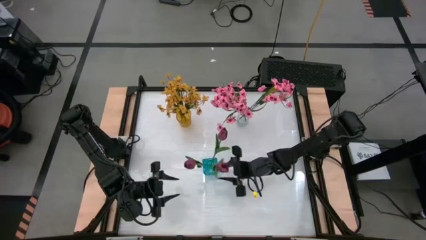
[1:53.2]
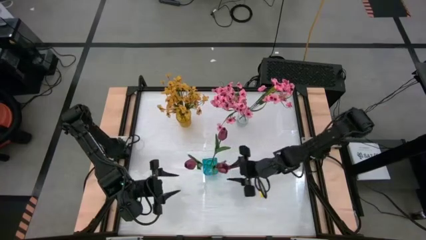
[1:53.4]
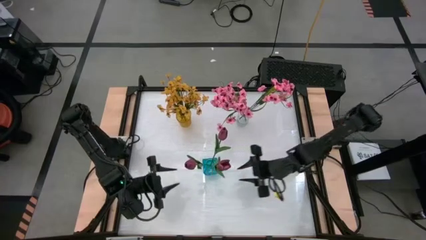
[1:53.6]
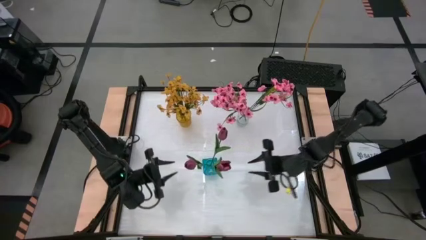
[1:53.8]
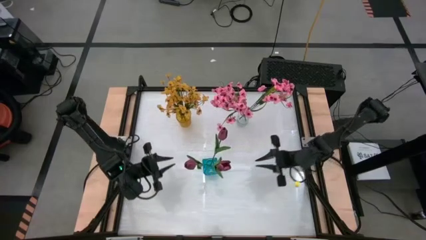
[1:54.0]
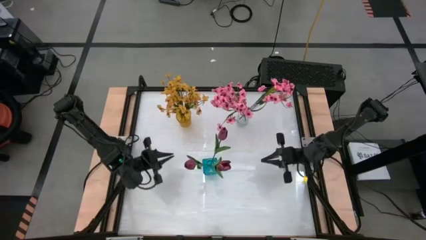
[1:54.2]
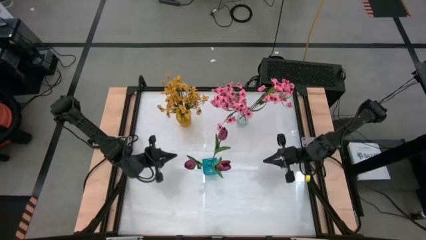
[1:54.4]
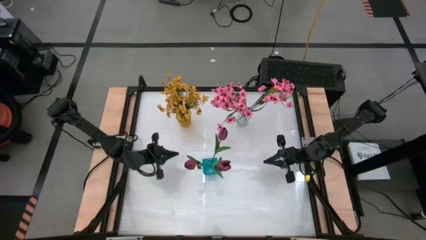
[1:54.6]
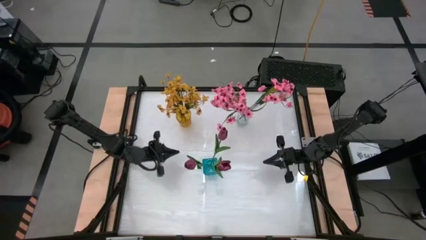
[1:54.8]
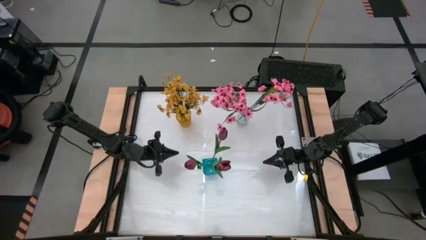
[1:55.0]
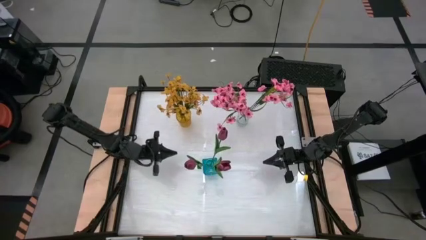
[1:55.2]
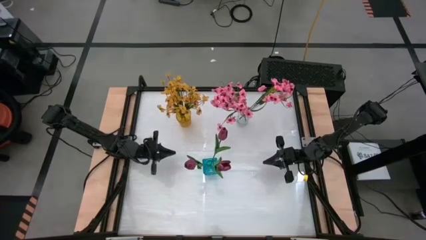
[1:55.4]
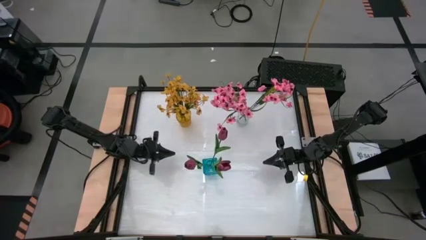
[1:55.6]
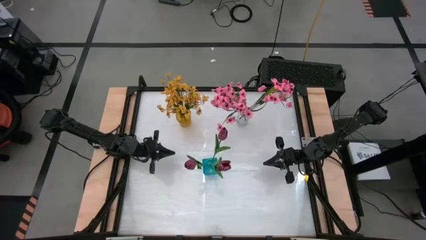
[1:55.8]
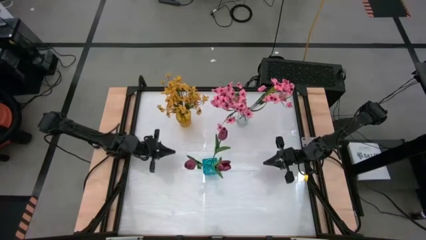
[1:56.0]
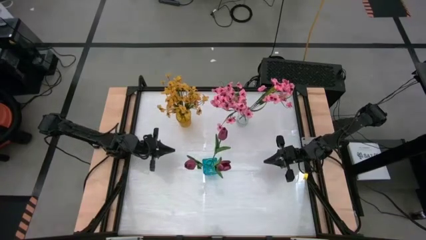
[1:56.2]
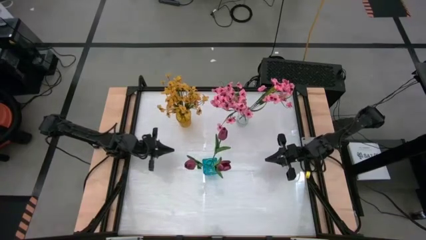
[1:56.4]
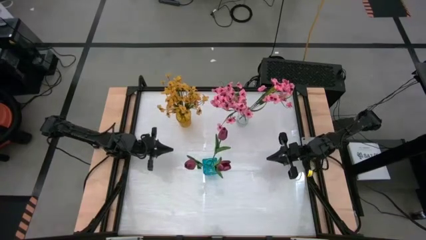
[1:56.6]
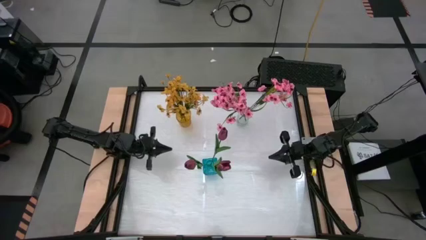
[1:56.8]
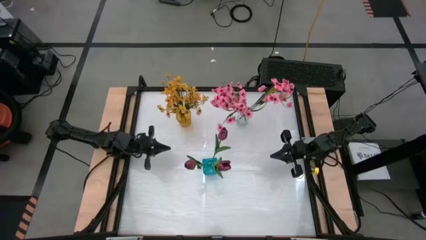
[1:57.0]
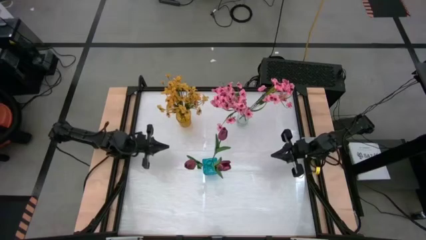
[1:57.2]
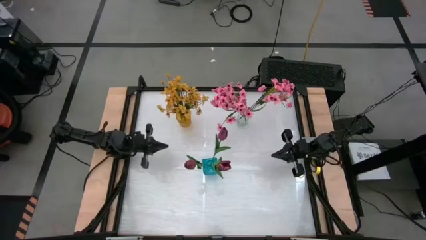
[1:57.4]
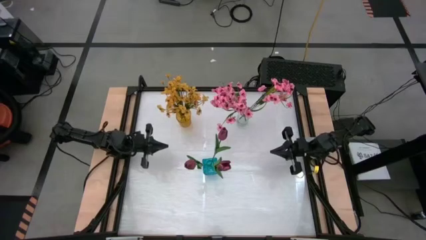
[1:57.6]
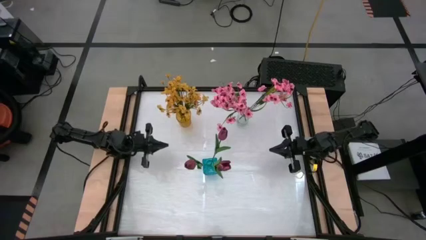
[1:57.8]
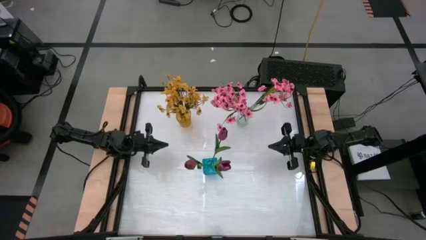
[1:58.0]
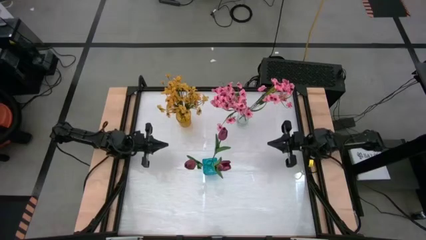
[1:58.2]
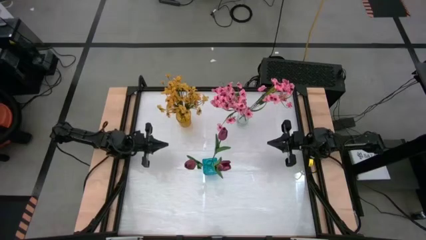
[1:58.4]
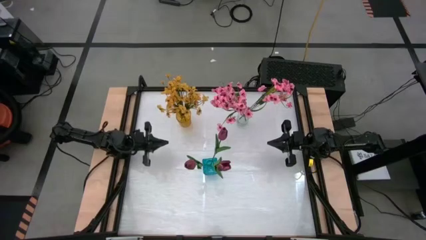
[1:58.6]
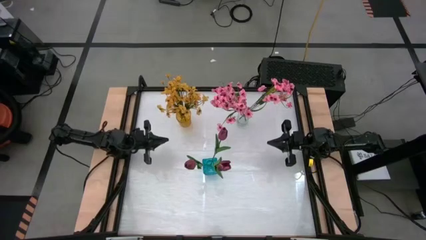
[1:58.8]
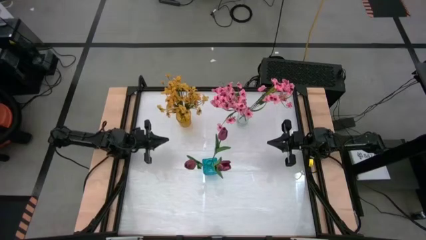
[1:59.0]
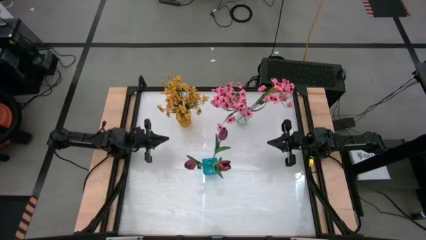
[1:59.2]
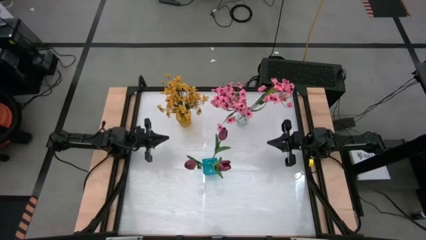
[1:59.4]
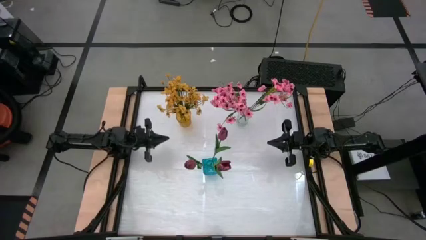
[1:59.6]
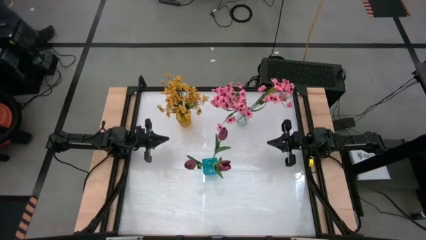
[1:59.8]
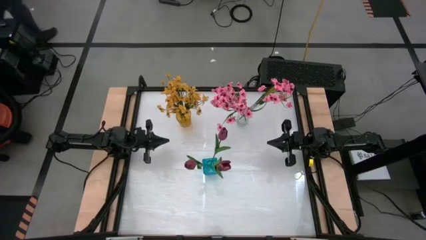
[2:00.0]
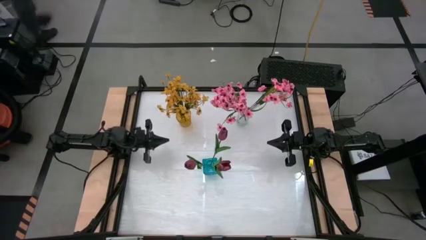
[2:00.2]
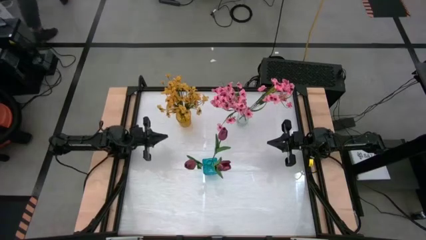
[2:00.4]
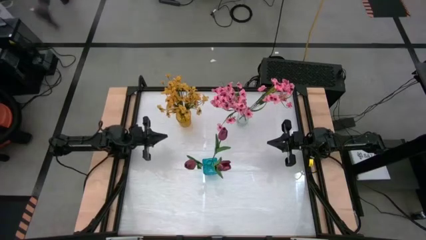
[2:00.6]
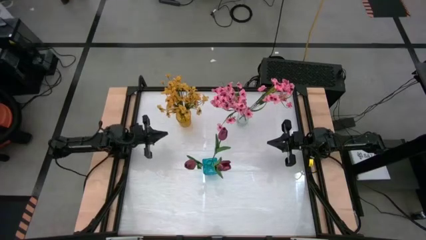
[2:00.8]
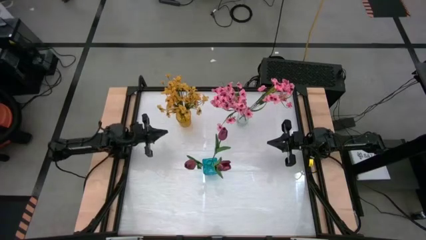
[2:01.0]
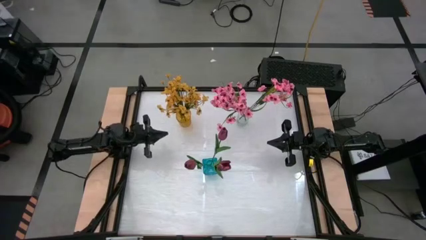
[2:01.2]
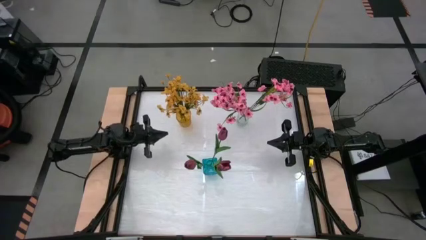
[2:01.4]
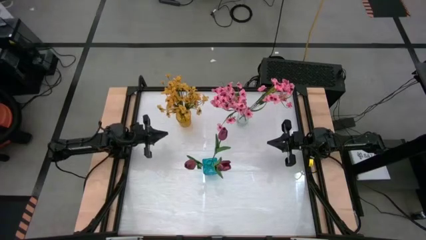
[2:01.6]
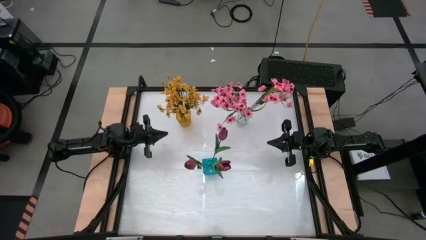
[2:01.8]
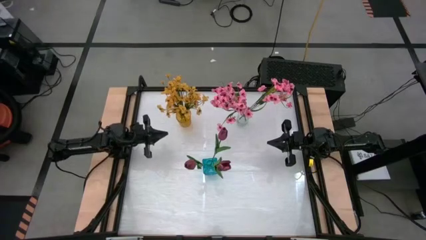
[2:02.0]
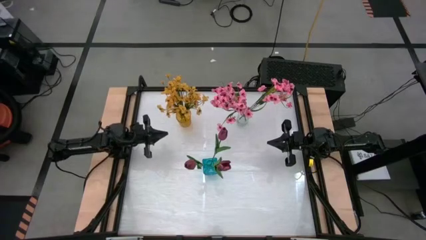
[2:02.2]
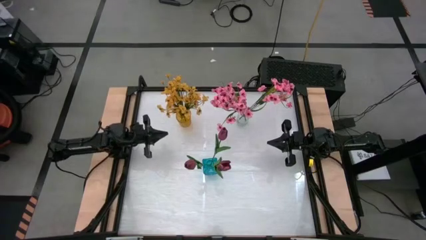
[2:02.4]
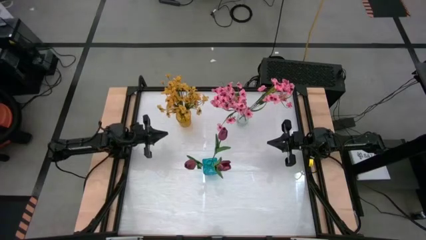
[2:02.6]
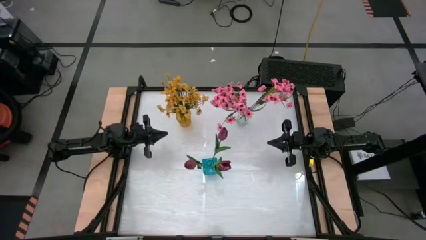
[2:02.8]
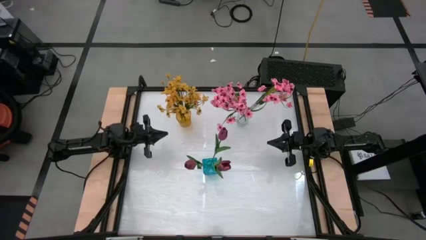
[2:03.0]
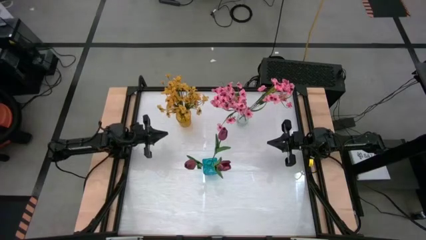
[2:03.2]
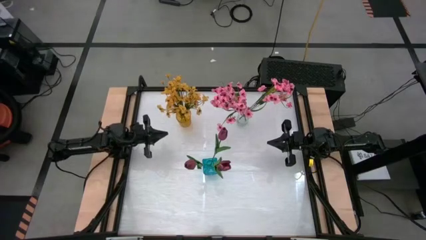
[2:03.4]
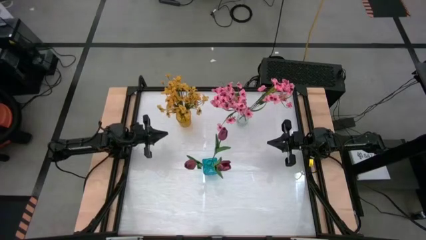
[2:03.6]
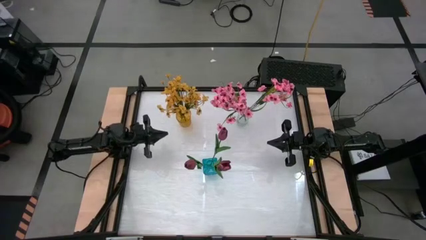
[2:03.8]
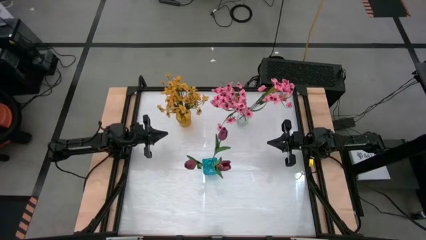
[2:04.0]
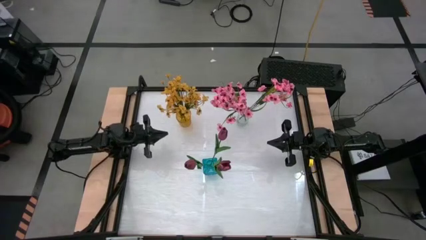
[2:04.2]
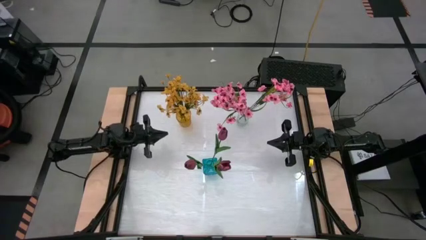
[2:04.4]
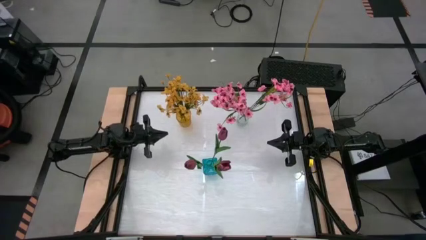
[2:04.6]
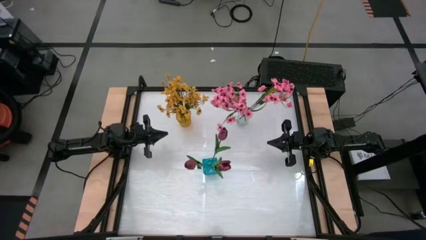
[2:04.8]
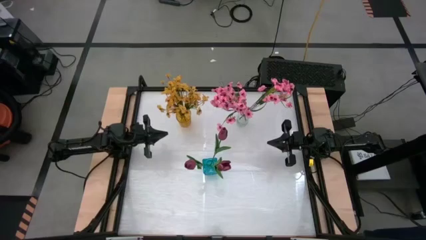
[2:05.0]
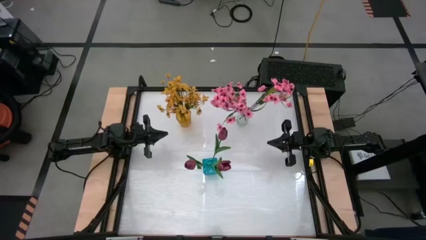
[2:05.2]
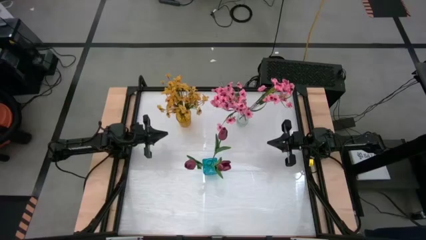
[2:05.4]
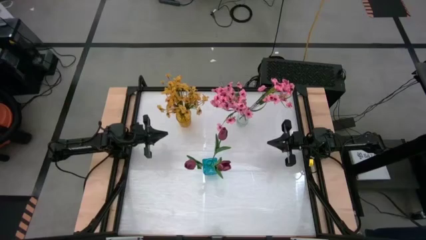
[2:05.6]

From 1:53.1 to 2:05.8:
Task: Sort flowers into vase by color
Return to Home Position

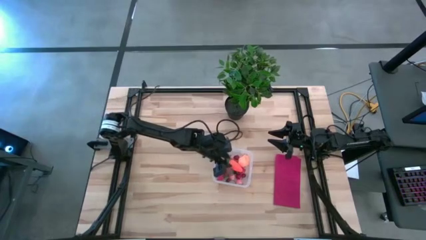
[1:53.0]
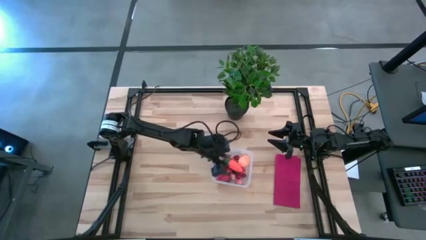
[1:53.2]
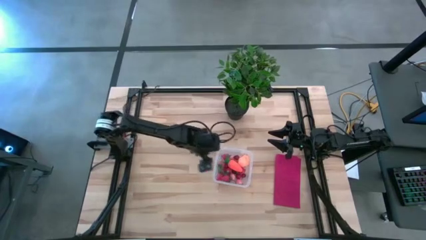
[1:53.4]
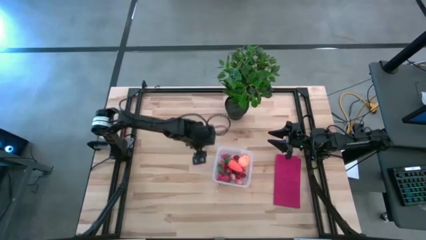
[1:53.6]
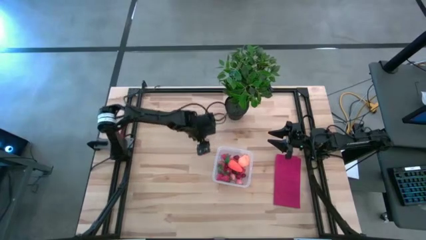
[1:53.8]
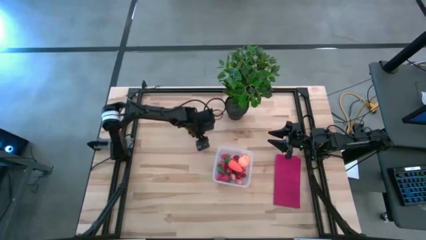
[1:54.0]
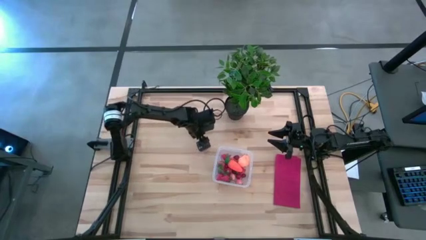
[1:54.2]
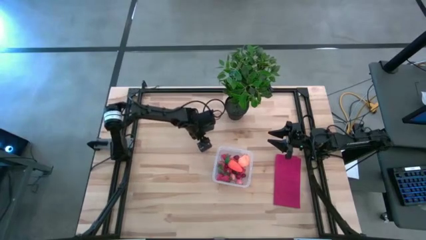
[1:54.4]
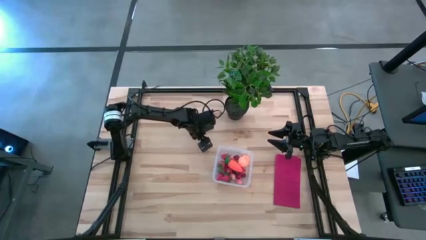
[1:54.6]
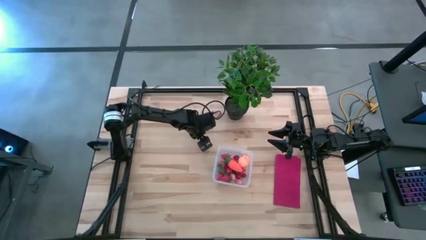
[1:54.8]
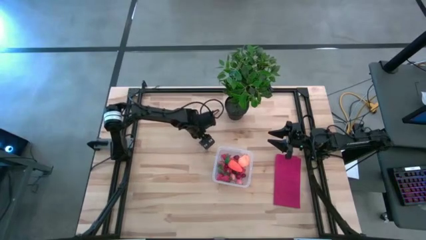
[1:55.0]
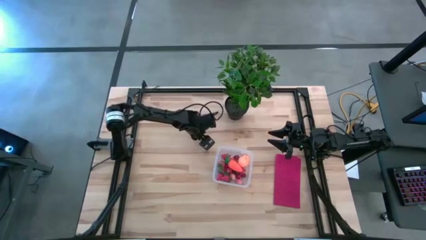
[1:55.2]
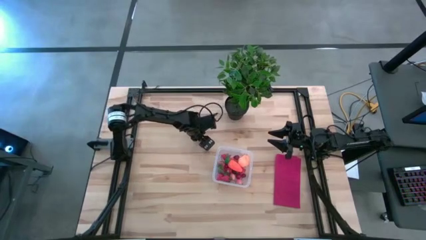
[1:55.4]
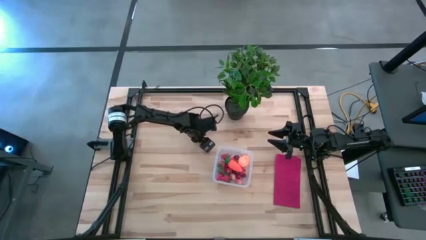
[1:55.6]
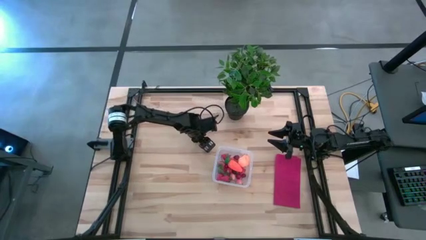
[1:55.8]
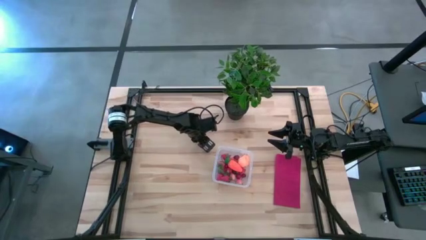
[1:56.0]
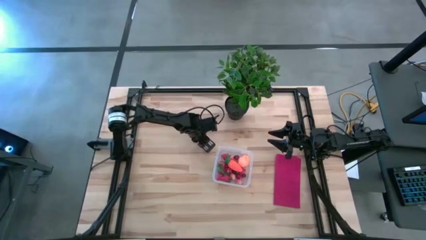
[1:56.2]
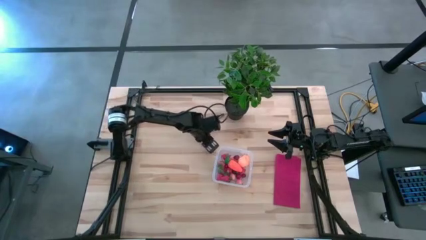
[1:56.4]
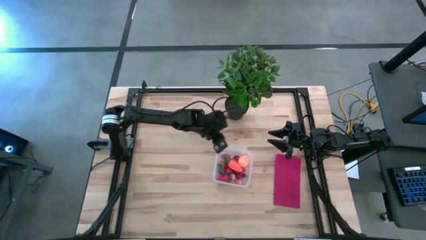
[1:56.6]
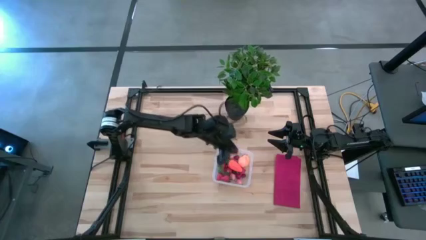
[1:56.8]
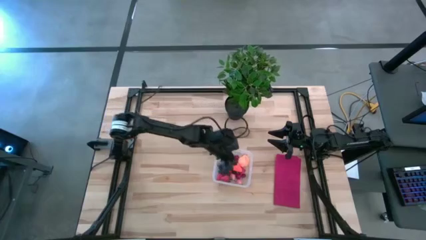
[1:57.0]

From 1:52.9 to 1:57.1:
Task: Pick and placing Produce into tupperware
Put the red cherry into the transparent bin
